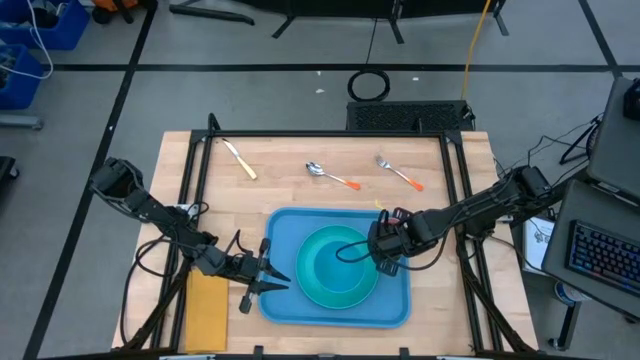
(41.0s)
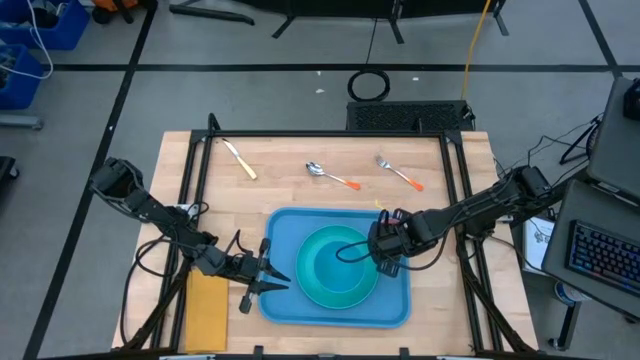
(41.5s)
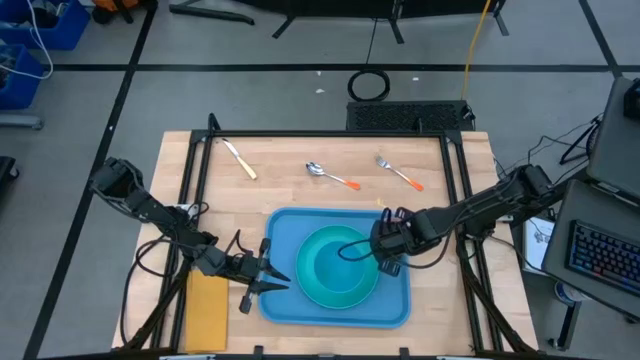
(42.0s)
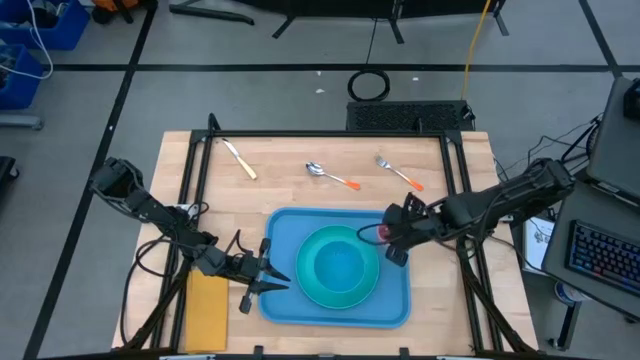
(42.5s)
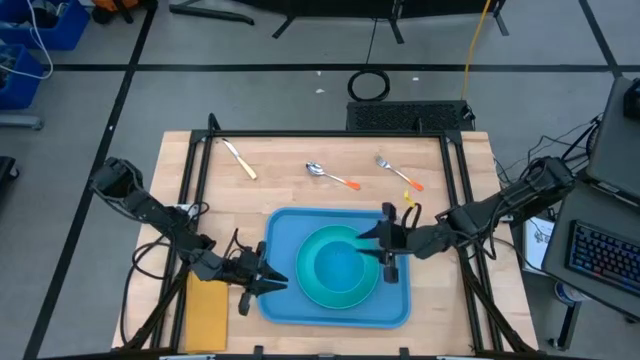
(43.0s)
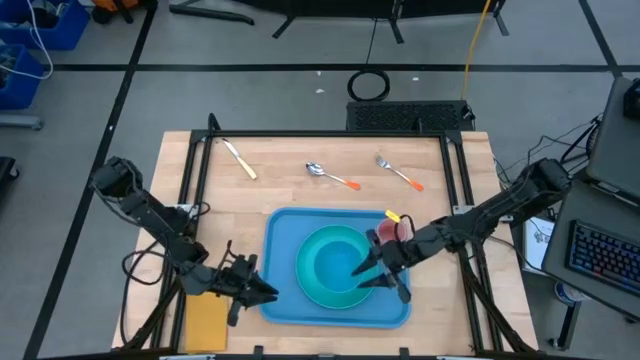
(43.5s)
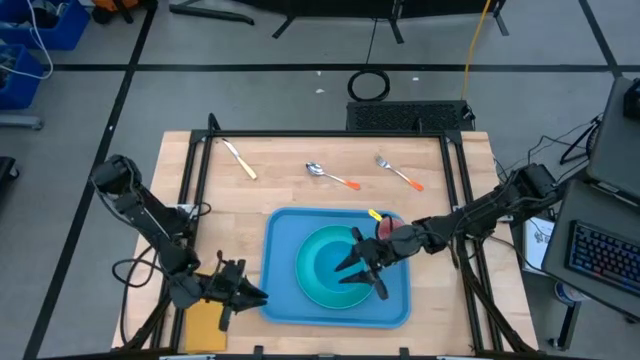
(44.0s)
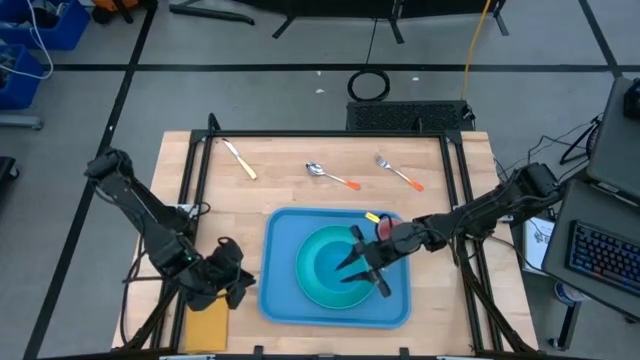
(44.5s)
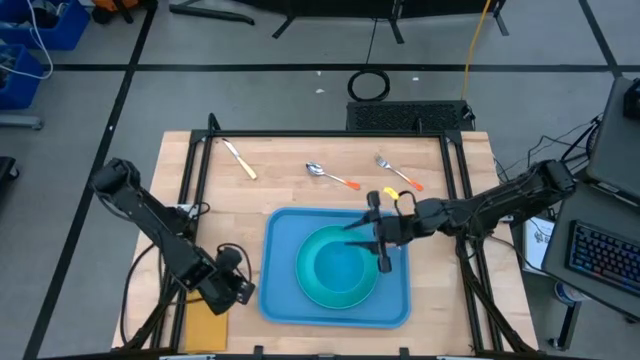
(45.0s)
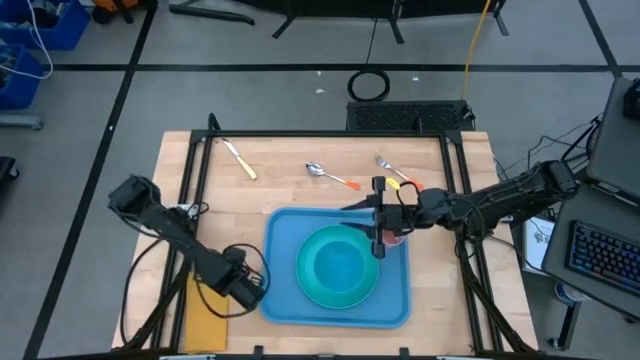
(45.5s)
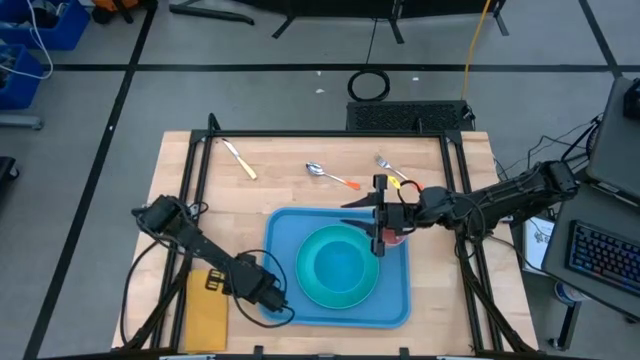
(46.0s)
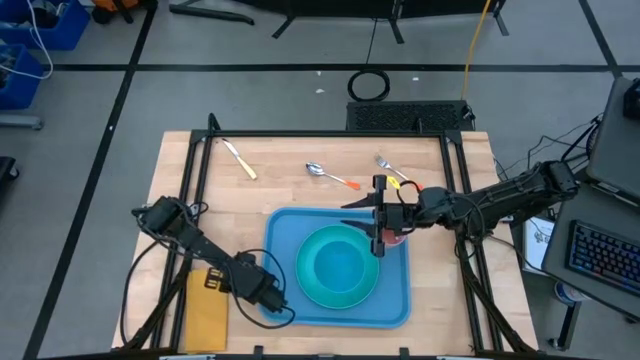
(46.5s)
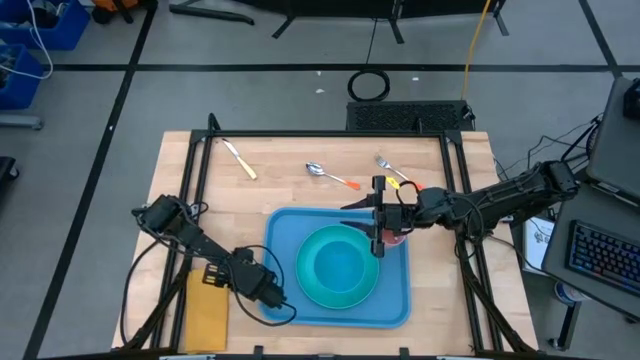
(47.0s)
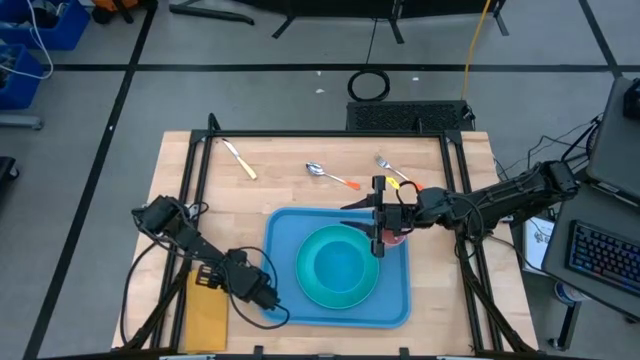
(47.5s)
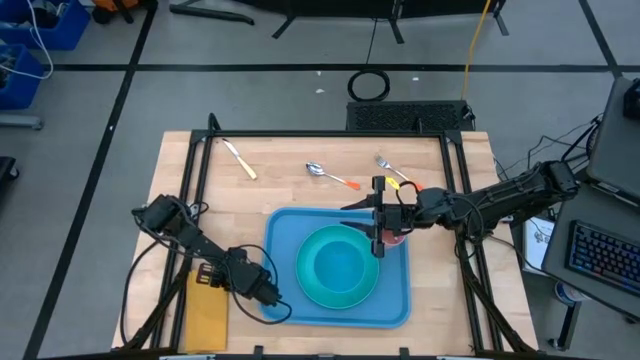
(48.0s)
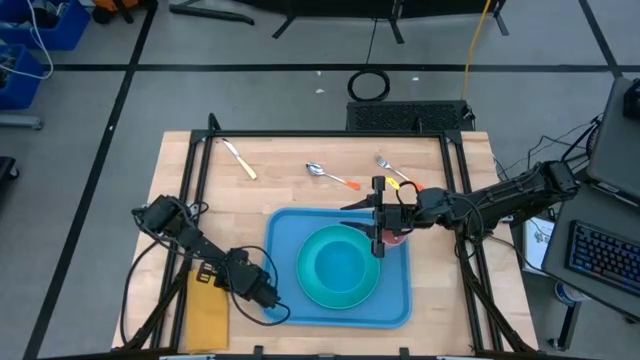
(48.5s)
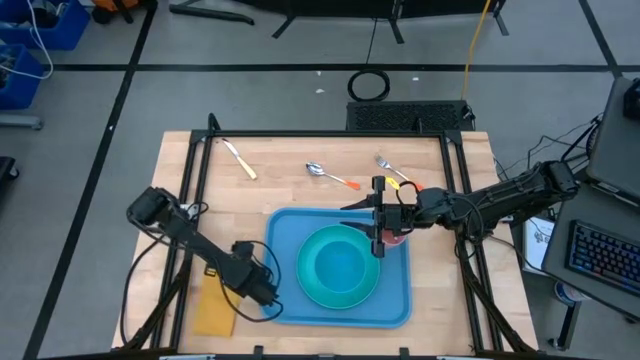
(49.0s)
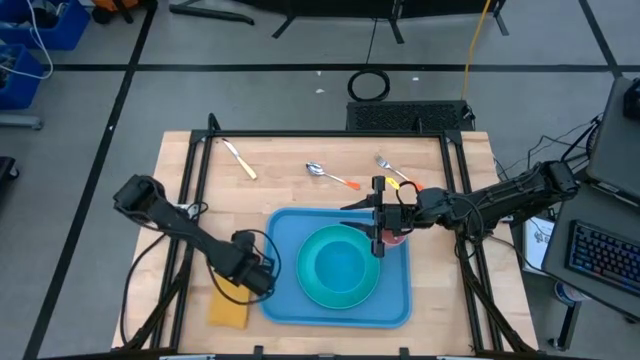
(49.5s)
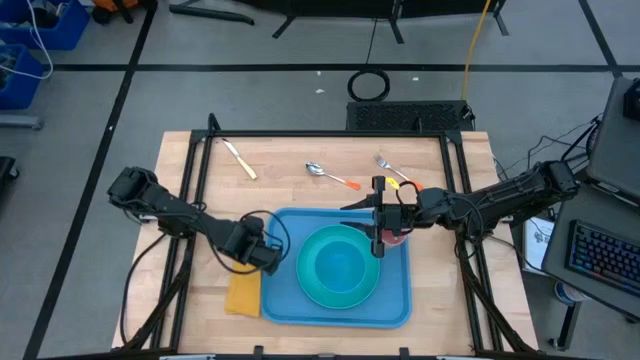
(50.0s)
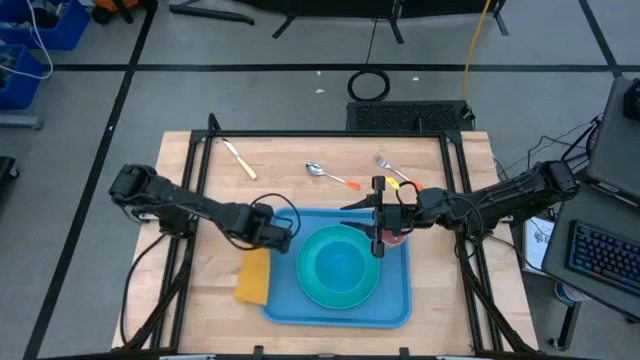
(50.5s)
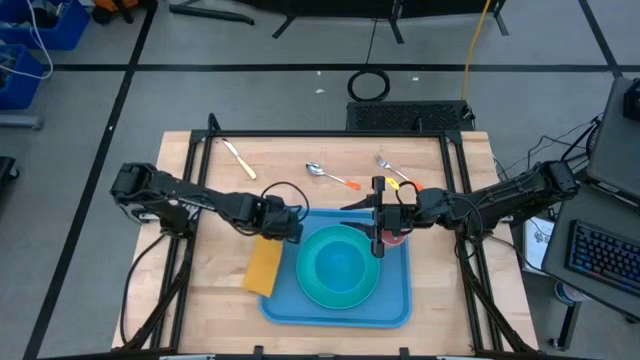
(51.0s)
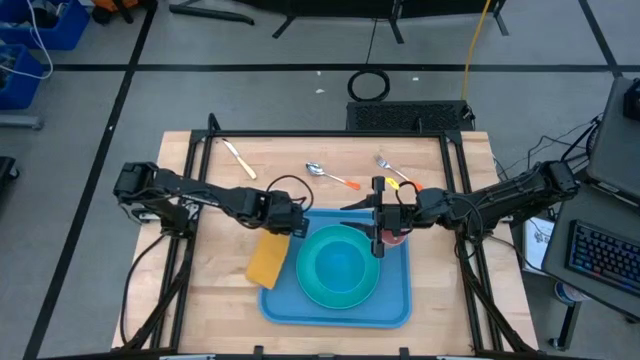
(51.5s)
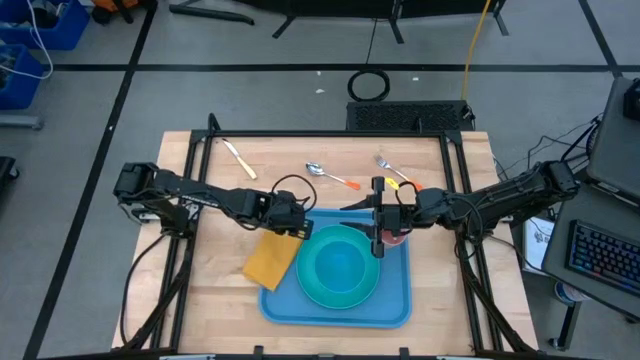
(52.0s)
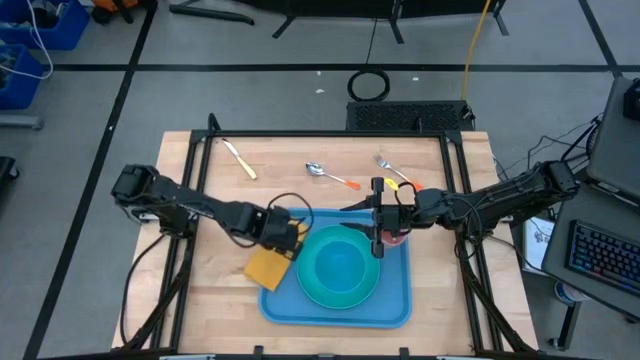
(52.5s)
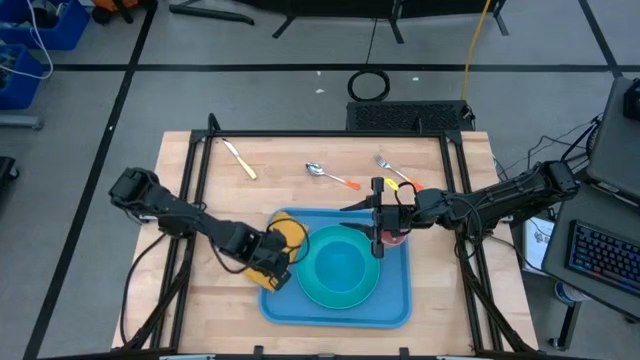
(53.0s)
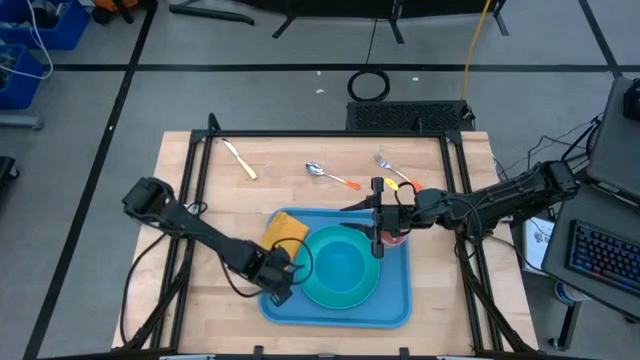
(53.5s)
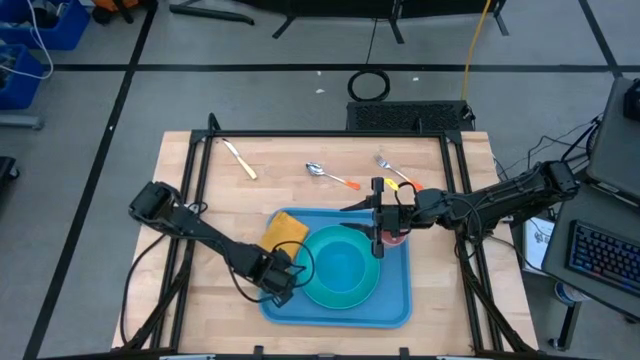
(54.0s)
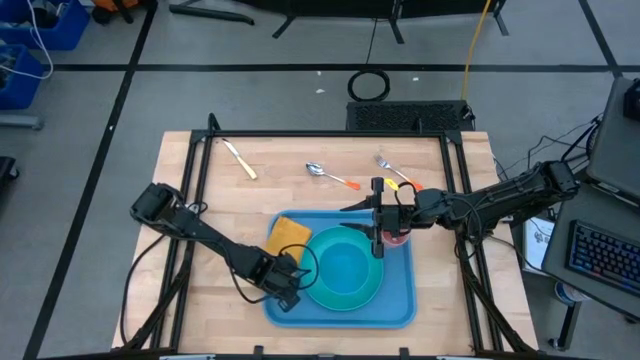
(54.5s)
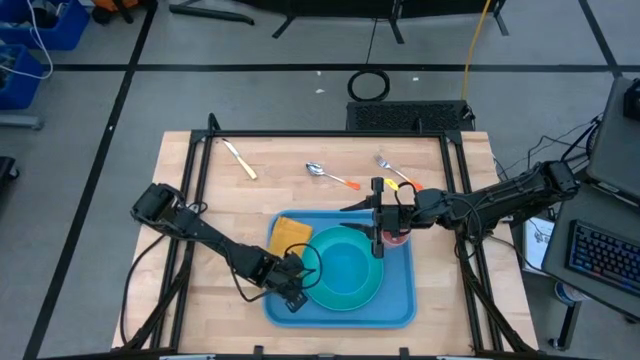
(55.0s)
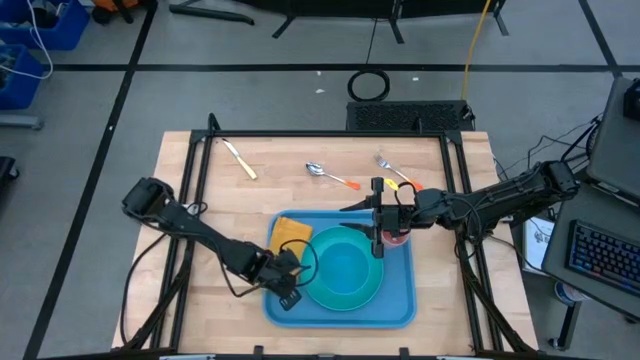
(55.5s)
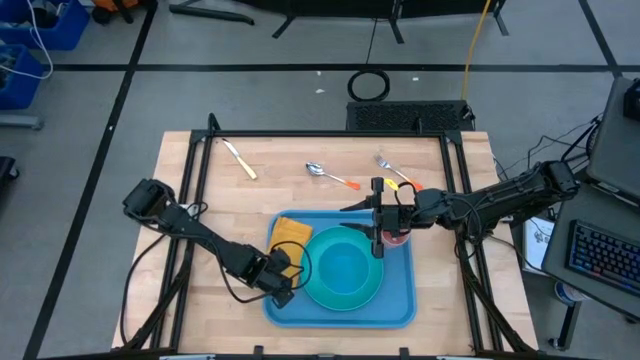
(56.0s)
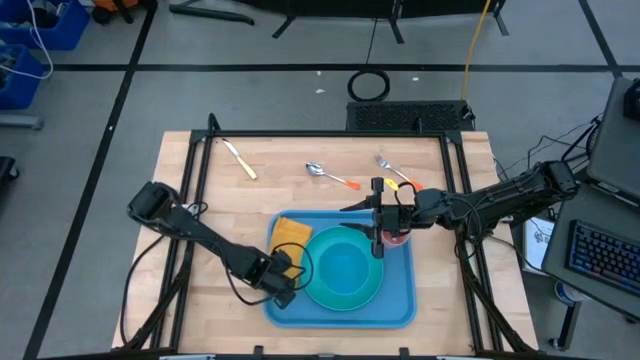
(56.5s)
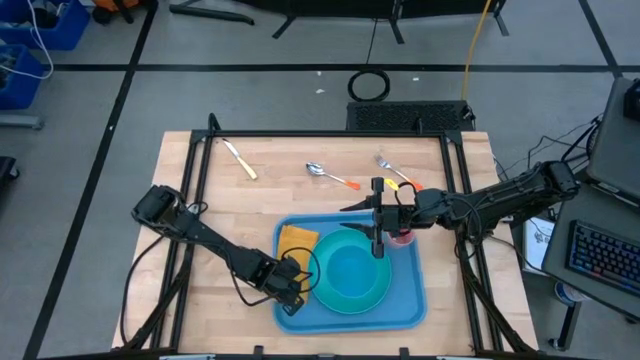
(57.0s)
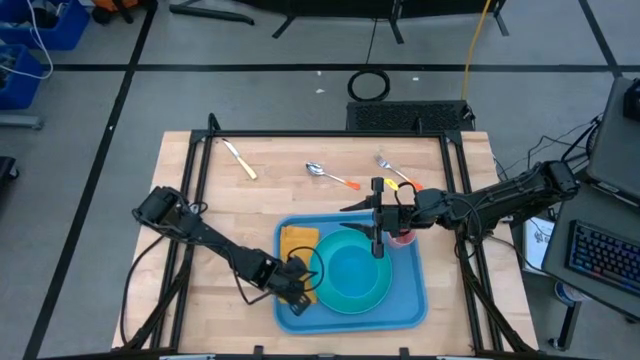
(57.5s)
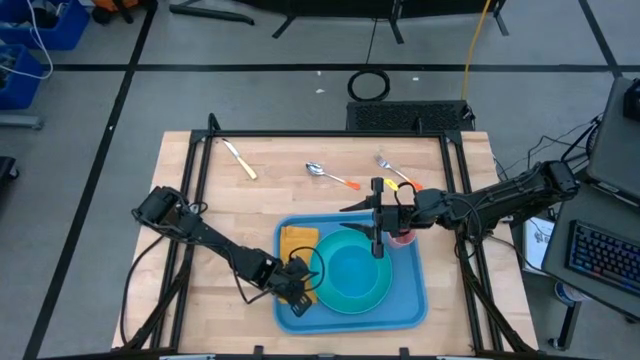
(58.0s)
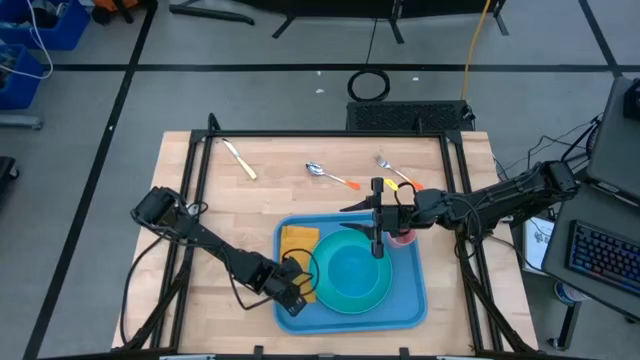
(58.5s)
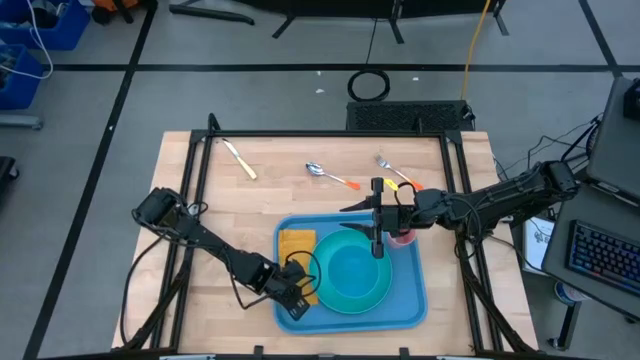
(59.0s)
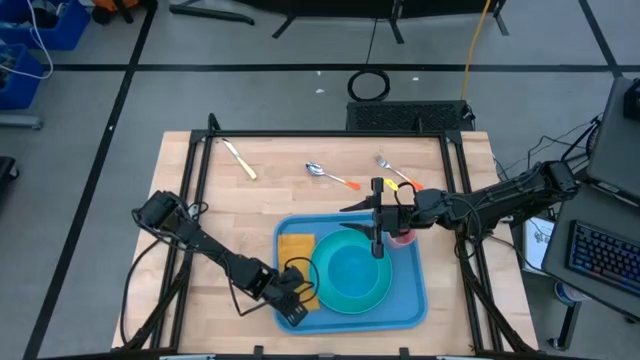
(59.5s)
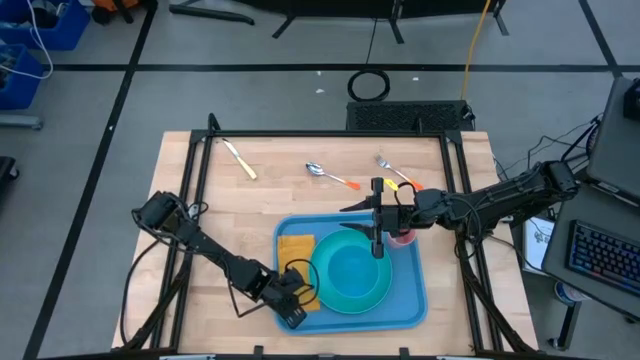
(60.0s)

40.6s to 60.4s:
Task: Set up tray
Put the yellow napkin on the blue serving tray to the left of the green plate

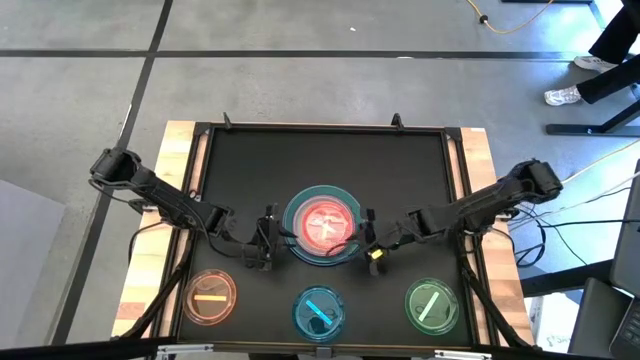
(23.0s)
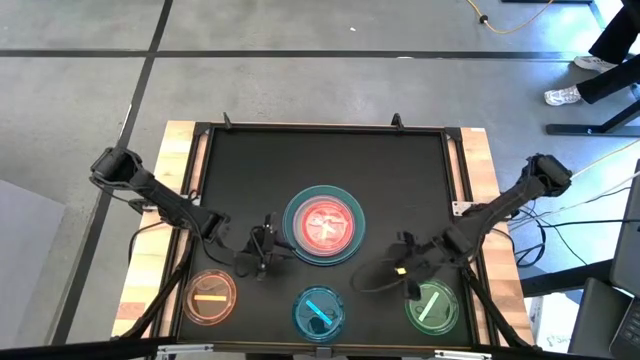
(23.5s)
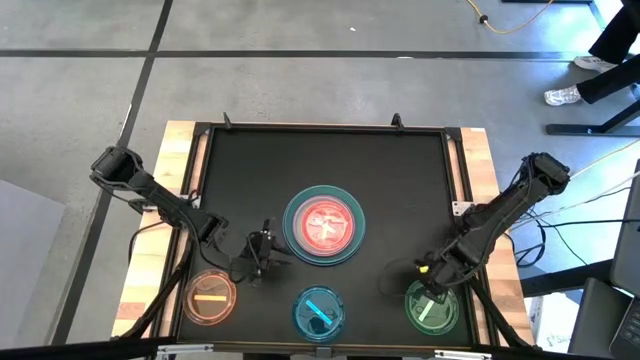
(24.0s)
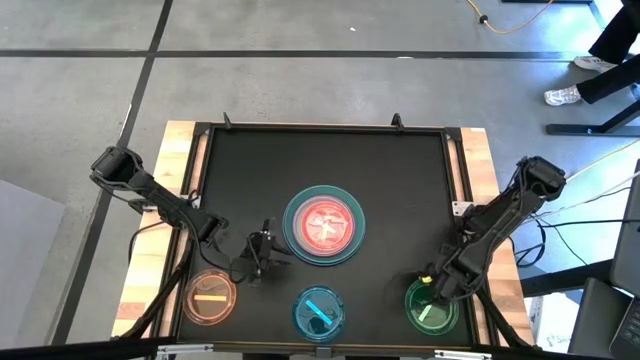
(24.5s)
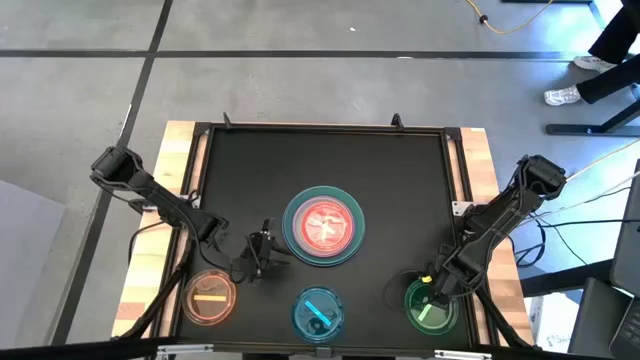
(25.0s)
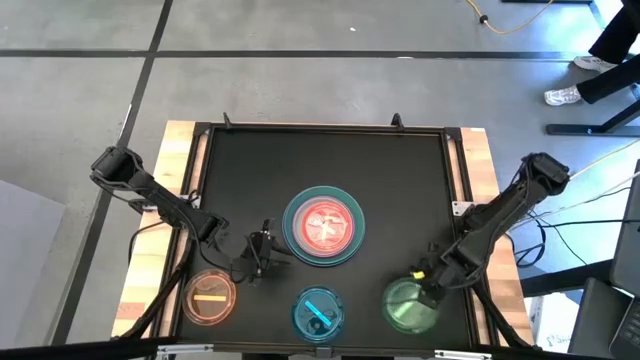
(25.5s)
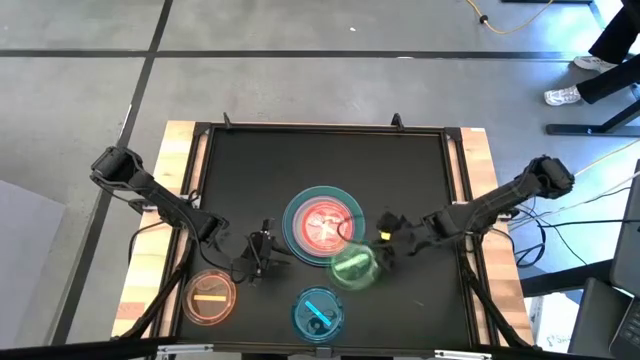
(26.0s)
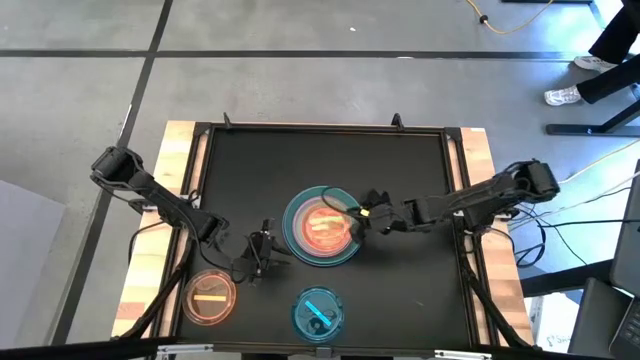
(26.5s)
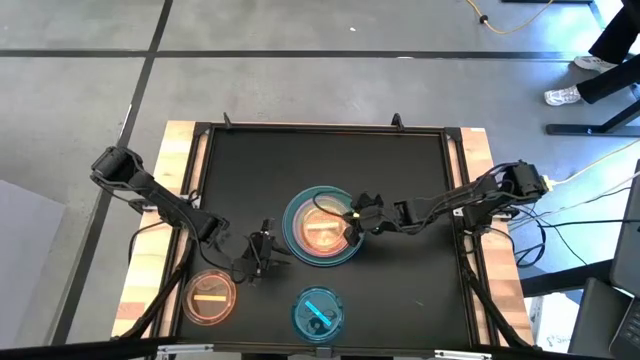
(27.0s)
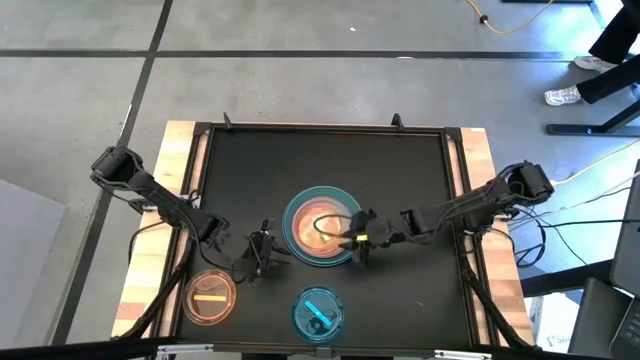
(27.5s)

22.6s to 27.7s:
Task: Stack plastic plates
Stack the light green plate on top of the light pink plate
